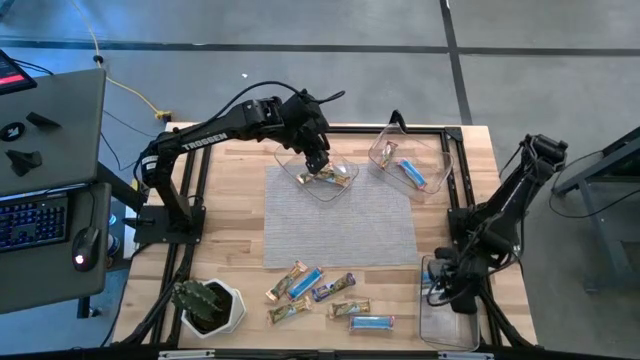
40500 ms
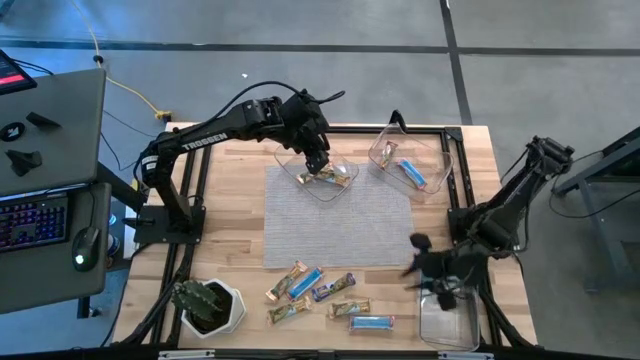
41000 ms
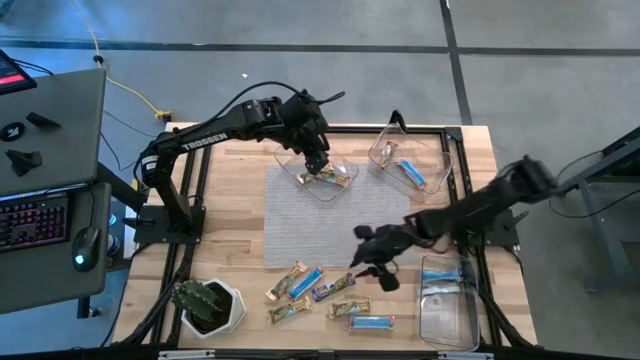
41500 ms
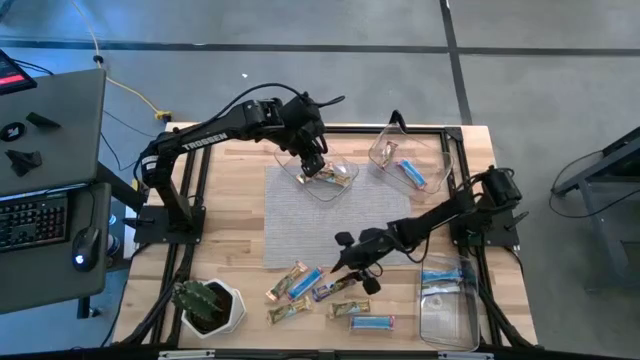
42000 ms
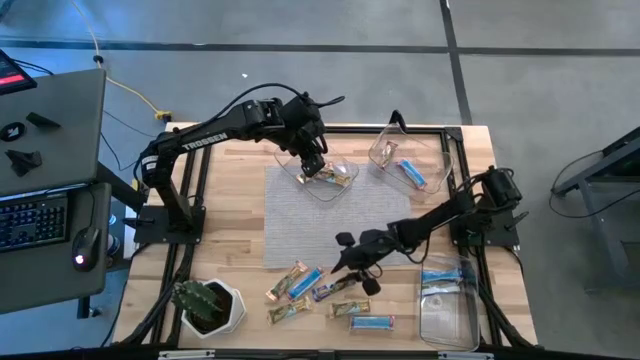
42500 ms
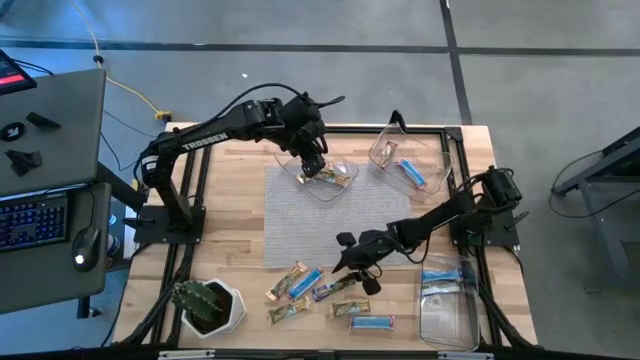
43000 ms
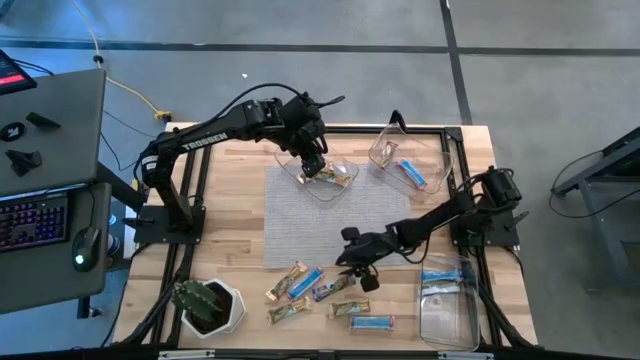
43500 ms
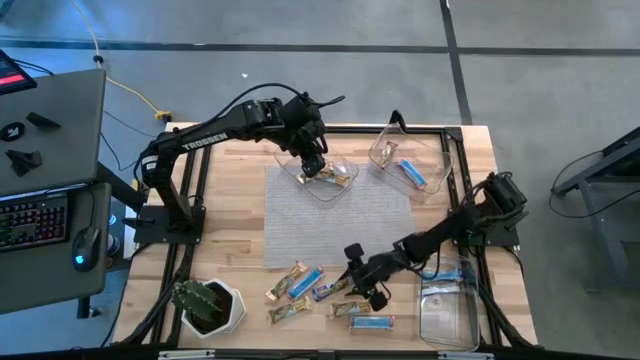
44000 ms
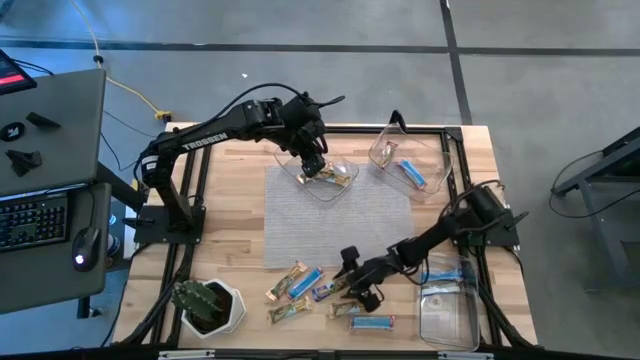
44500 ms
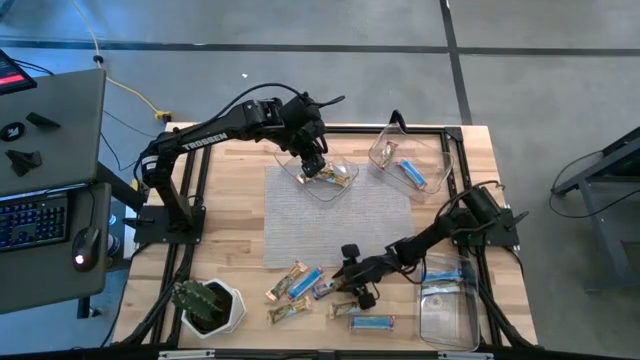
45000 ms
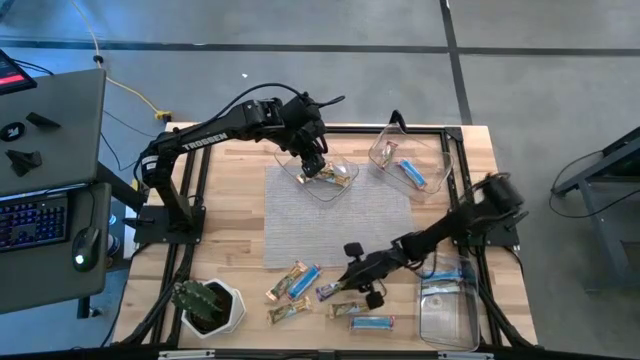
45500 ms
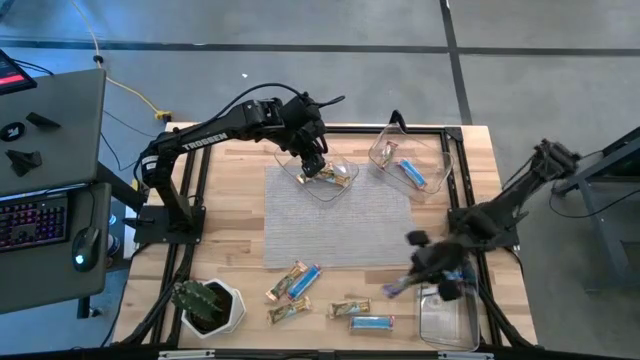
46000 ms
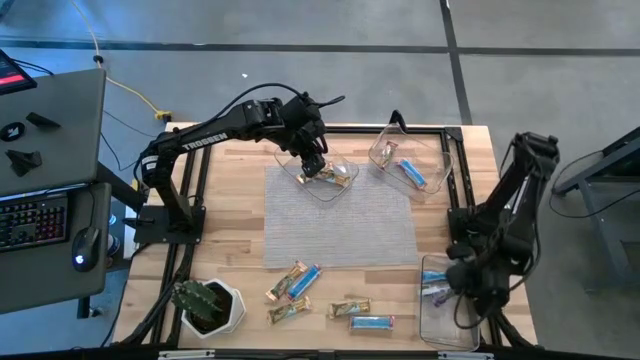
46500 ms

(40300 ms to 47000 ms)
Task: Pick and place Granola Bars by type
Put the blue granola into the bottom right transparent bin

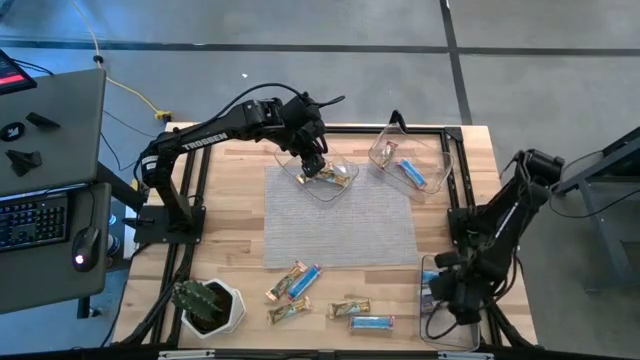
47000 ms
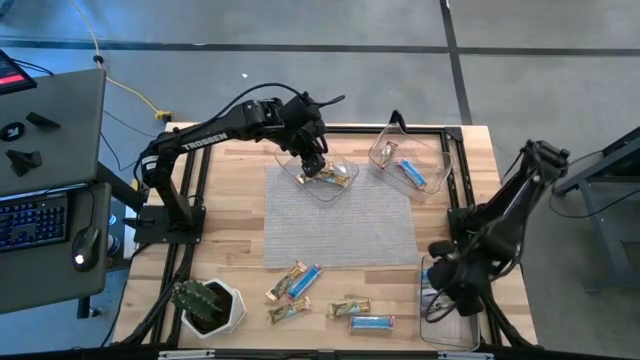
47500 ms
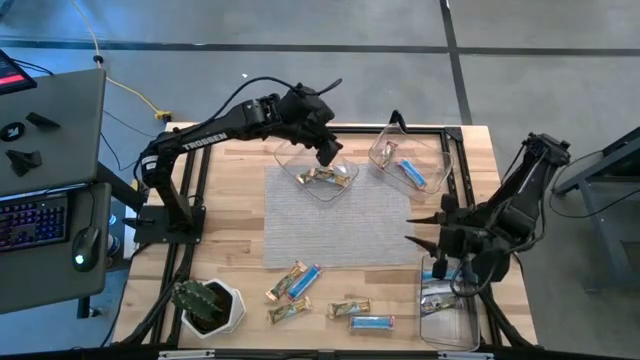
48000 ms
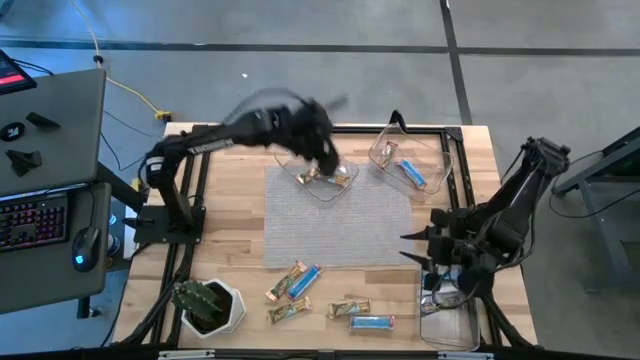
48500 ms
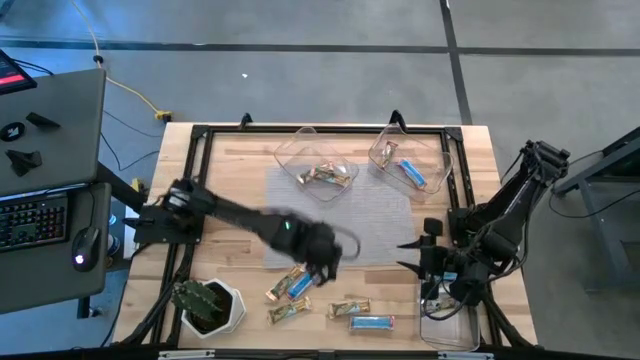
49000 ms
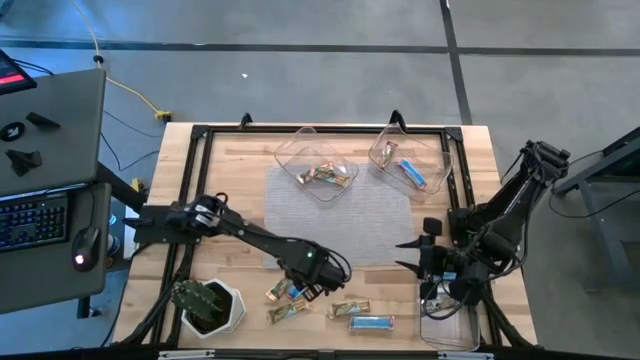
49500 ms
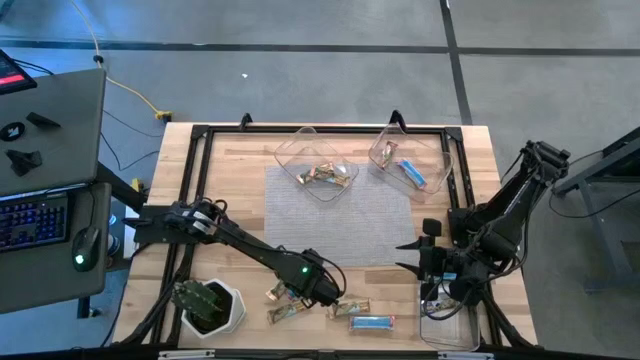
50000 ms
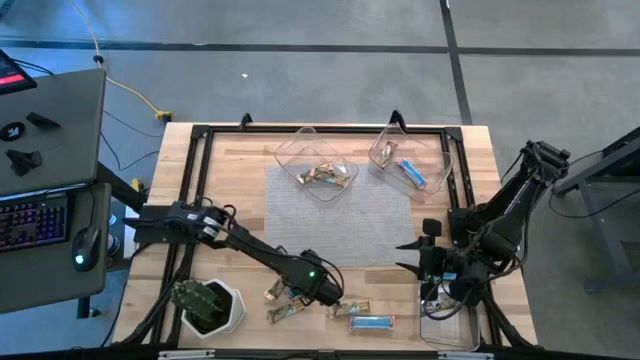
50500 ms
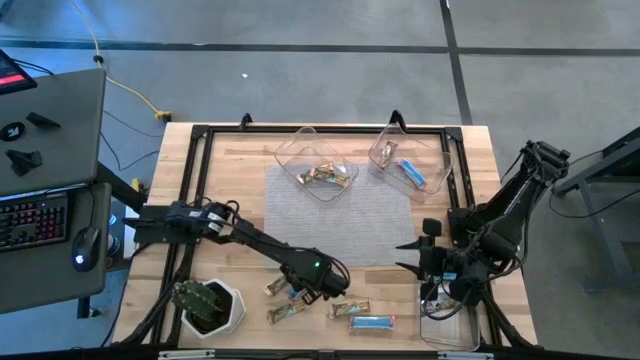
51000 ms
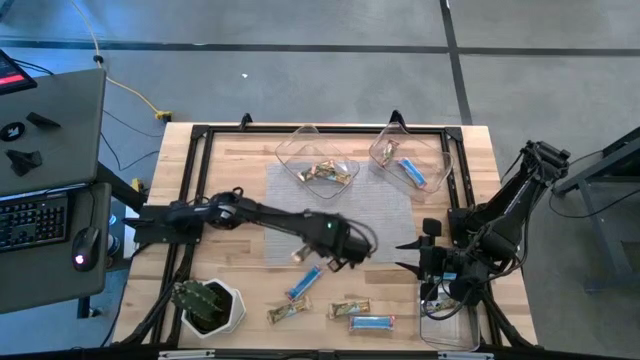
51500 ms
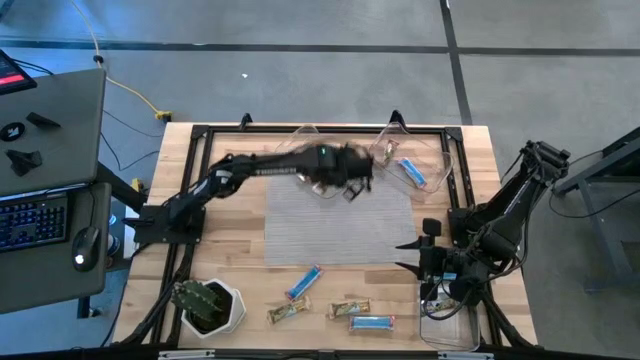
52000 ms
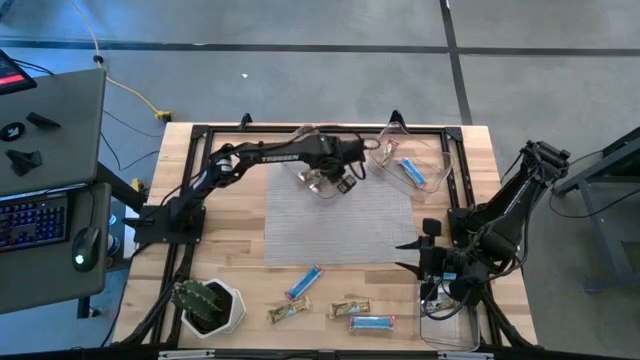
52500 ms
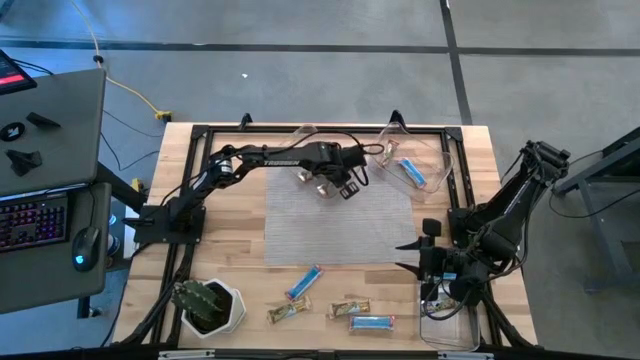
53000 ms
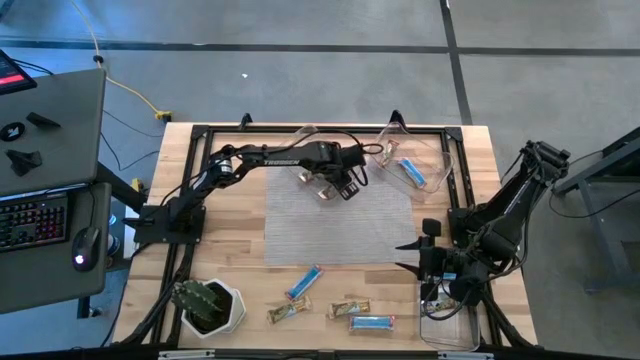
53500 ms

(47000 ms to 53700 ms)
Put the yellow granola bar into the top middle transparent bin

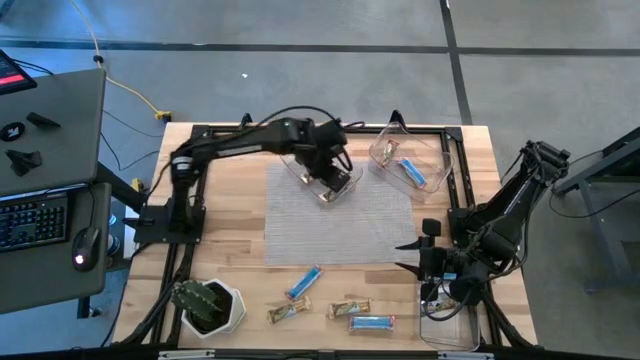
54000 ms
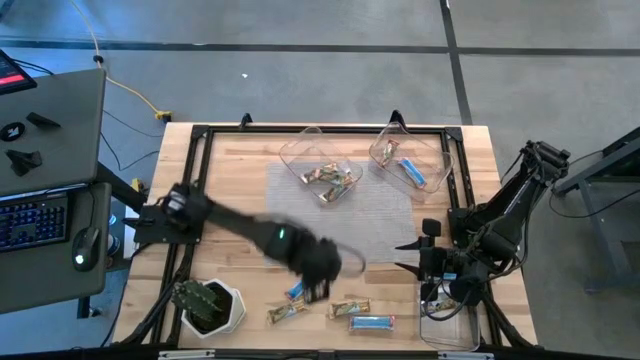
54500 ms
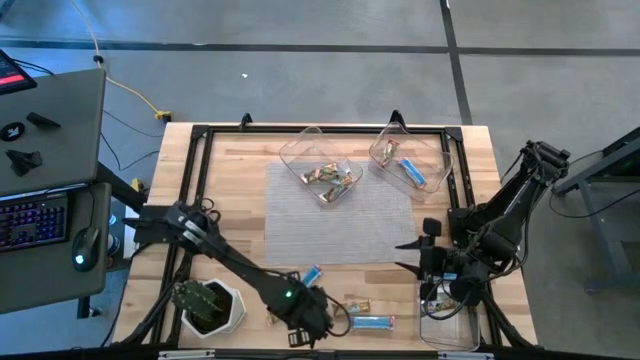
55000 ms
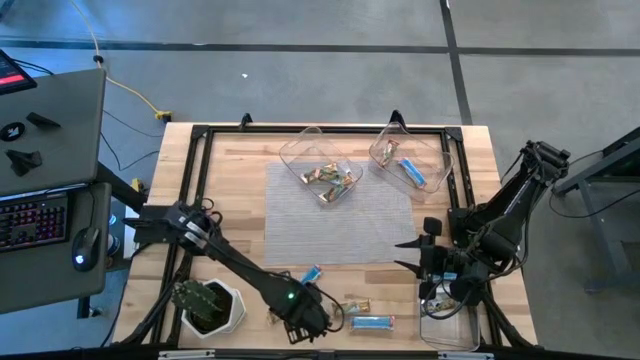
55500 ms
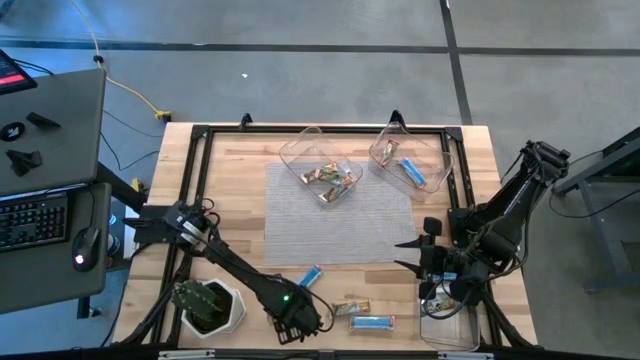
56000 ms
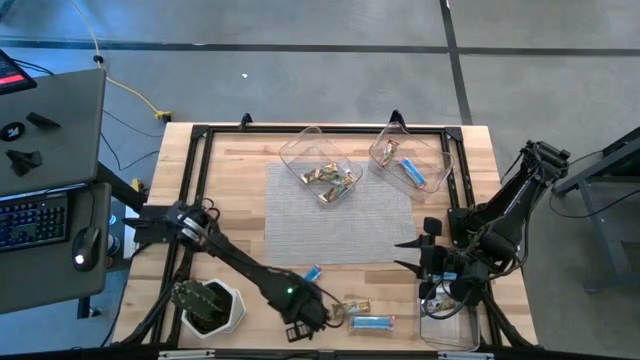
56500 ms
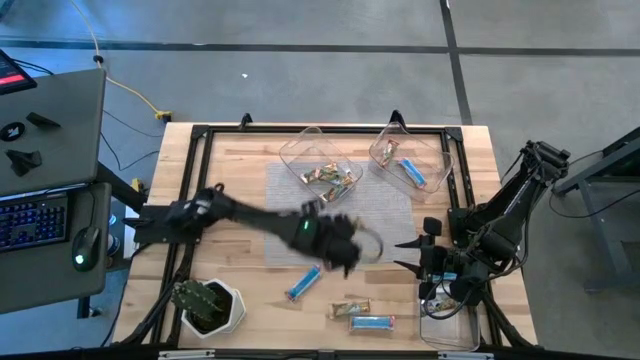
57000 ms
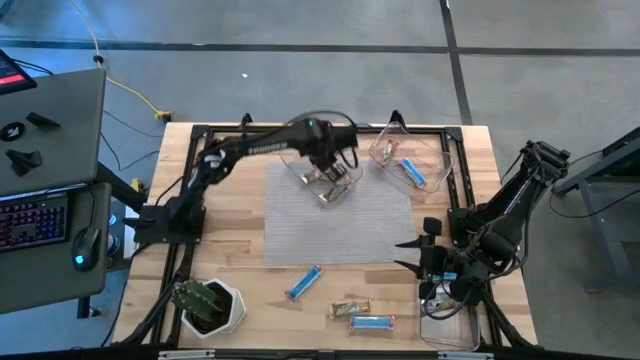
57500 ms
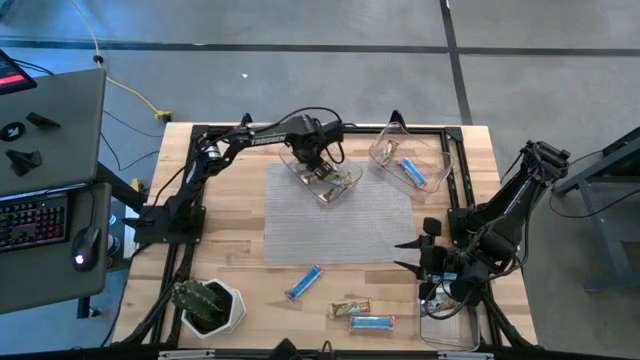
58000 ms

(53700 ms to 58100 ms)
Put the yellow granola bar into the top middle transparent bin

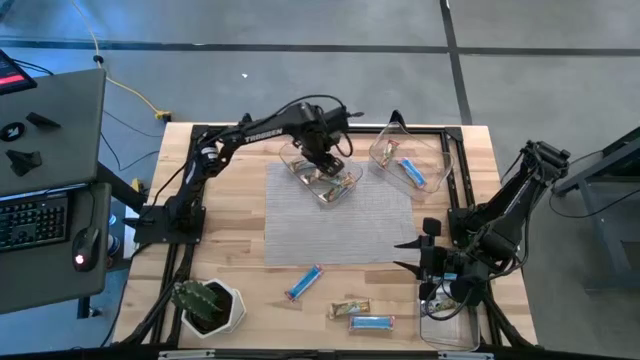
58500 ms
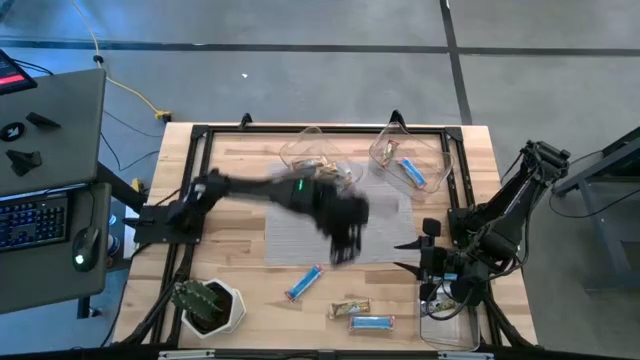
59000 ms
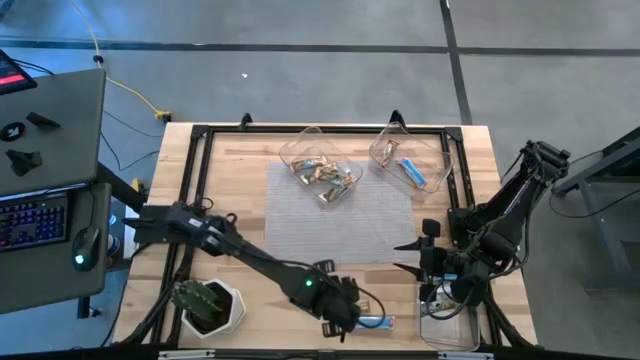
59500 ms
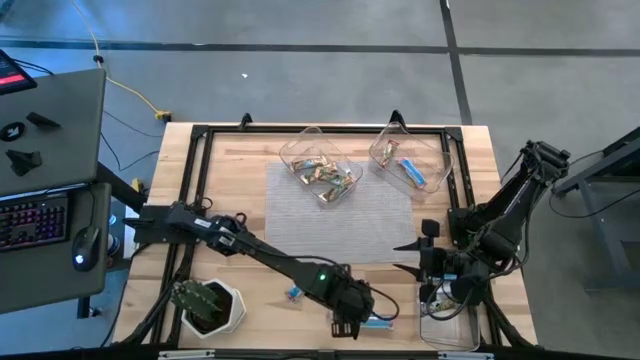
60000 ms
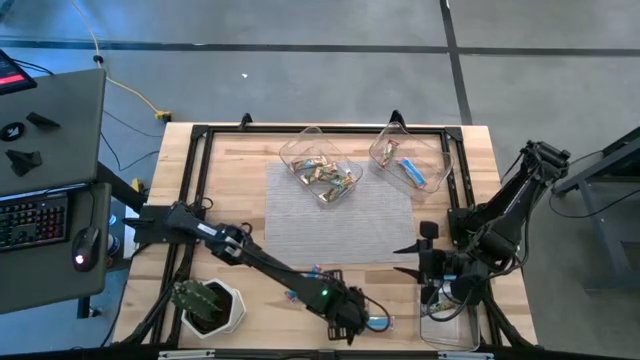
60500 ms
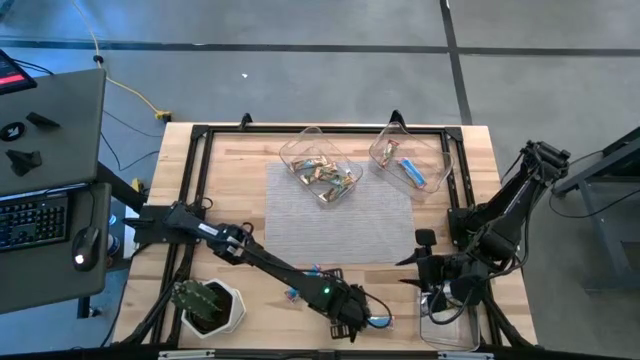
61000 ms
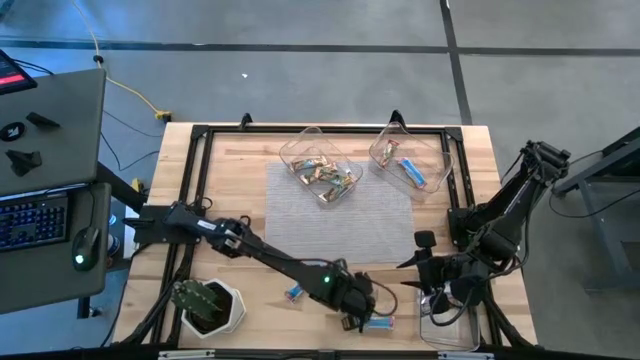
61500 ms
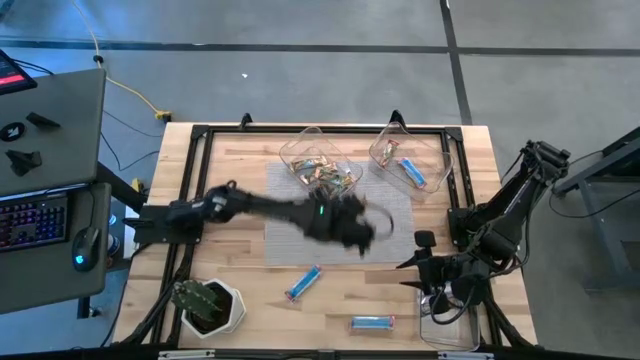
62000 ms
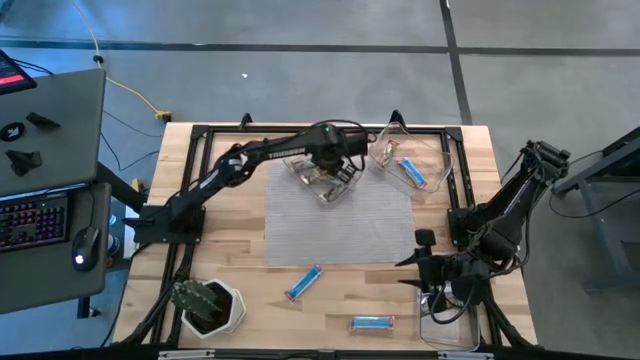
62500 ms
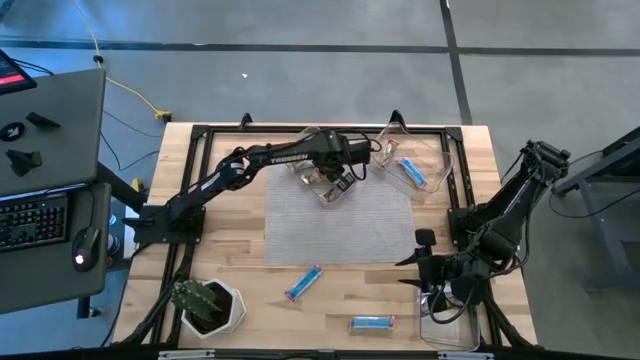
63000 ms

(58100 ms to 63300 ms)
Put the yellow granola bar into the top middle transparent bin
